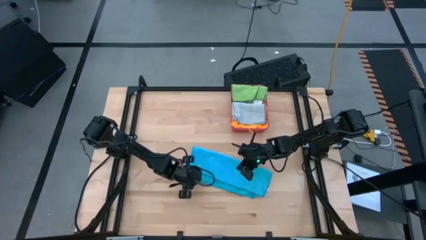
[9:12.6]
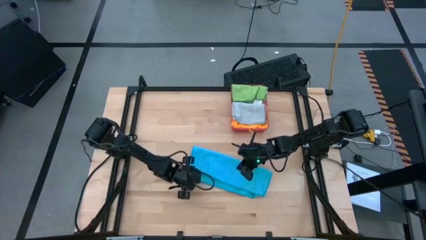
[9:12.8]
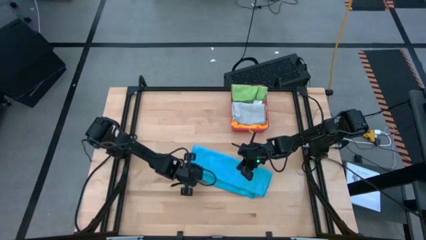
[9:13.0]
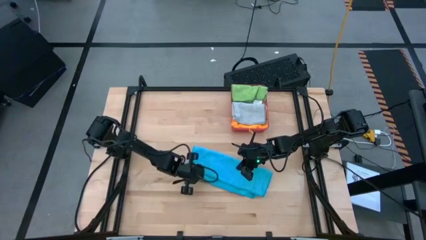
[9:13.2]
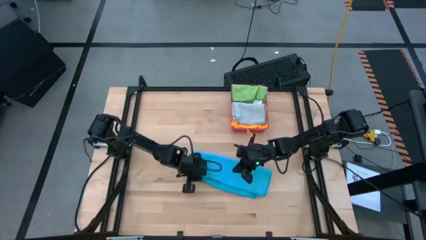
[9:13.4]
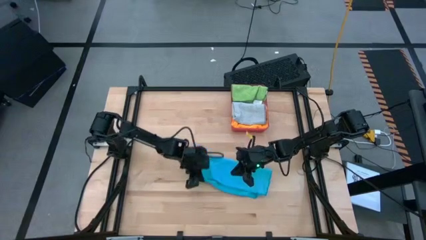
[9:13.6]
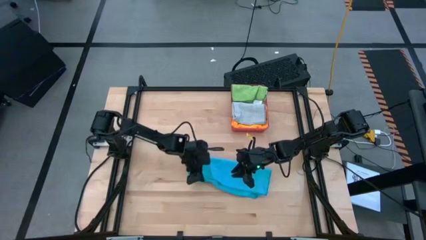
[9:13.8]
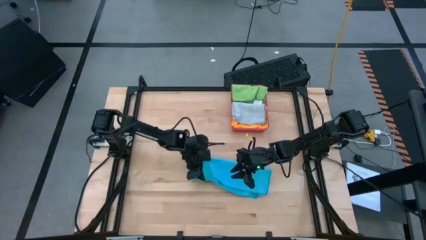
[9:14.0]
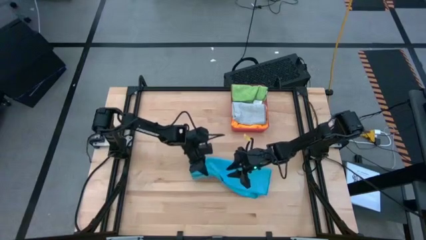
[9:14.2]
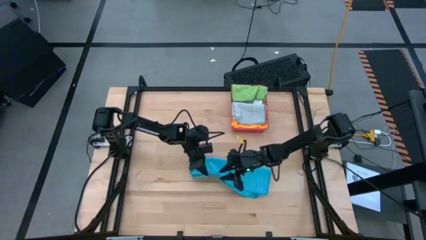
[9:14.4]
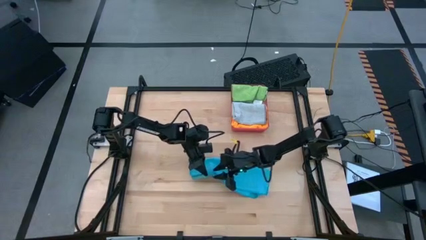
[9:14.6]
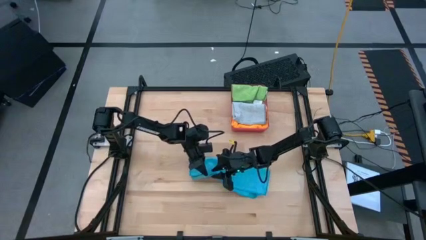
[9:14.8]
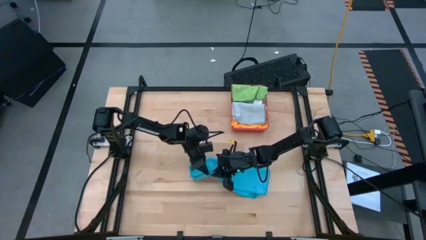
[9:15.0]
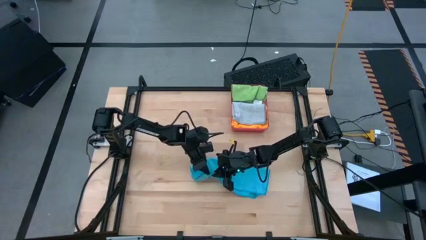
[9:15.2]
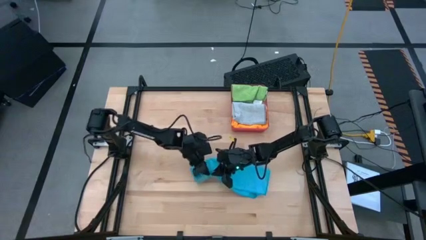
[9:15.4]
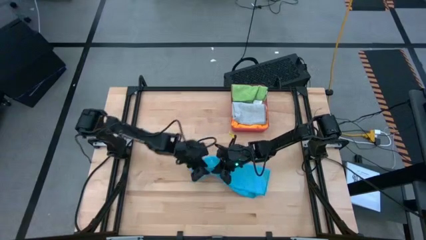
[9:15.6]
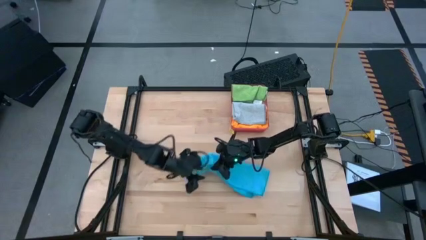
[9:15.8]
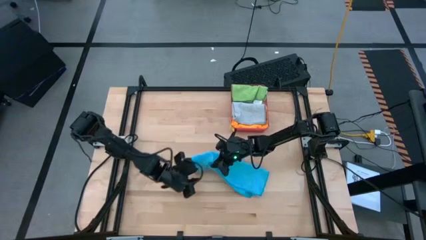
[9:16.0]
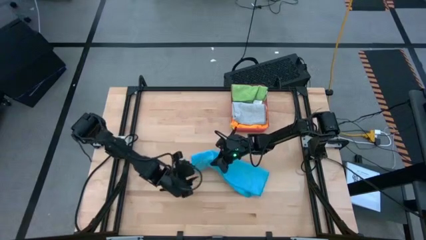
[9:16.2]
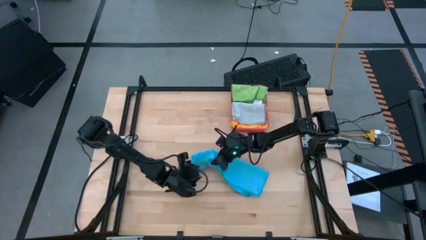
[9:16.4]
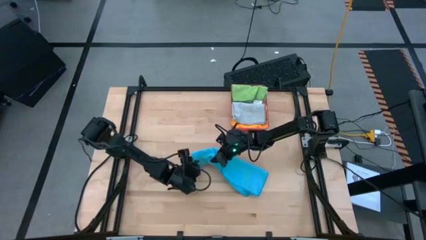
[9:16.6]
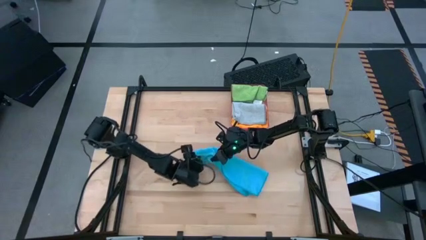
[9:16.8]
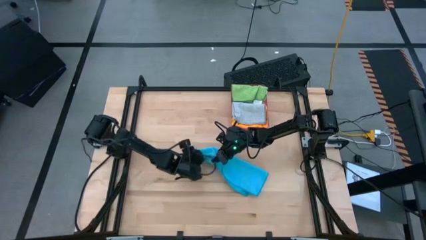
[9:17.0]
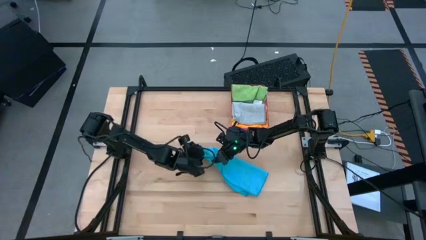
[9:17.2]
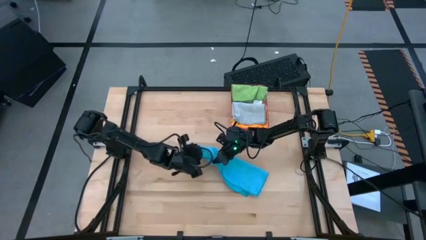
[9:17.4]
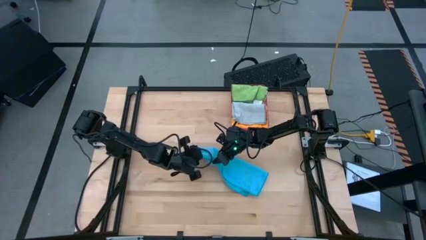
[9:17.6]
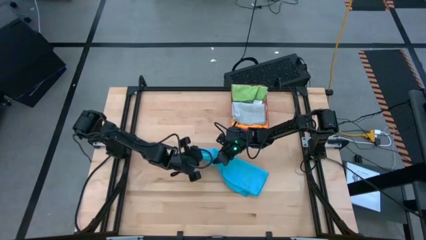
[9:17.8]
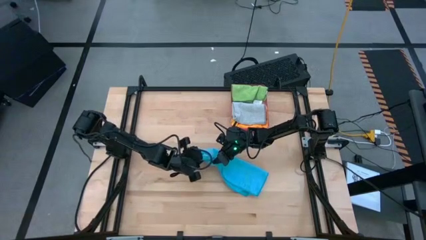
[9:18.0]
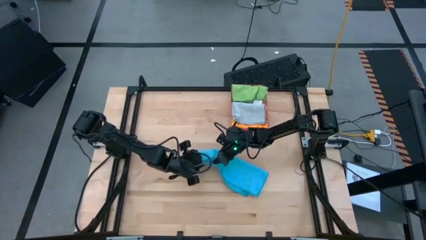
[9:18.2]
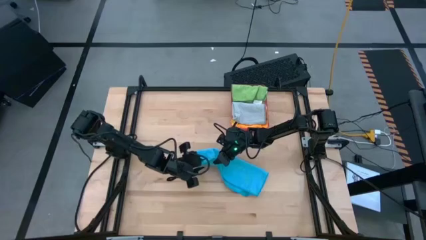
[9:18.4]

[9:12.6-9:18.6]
Task: Fold microfiber towels
Fold the blue microfiber cloth

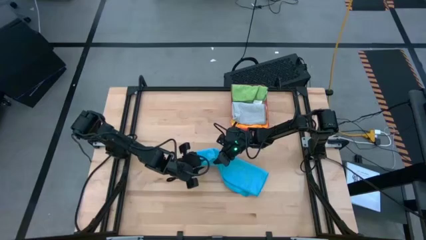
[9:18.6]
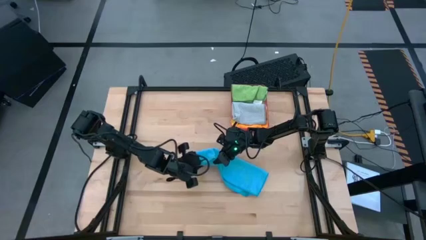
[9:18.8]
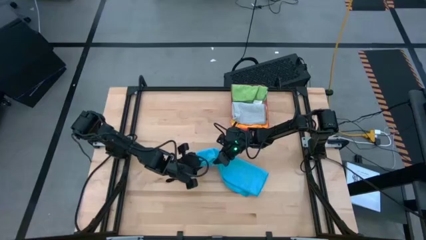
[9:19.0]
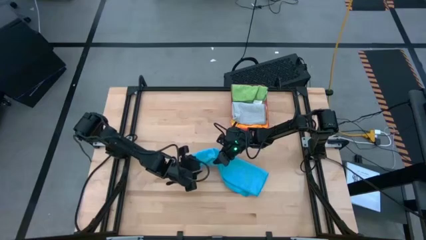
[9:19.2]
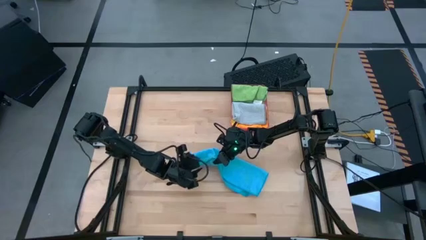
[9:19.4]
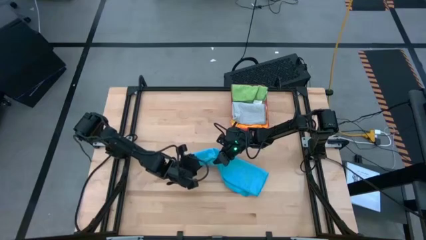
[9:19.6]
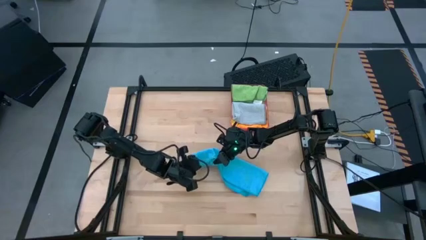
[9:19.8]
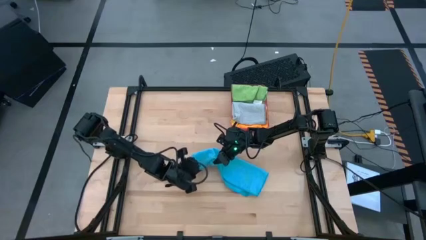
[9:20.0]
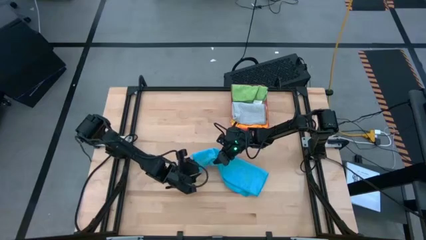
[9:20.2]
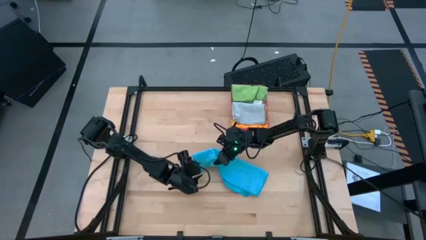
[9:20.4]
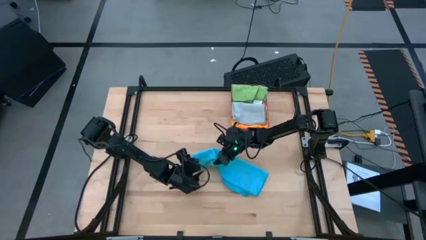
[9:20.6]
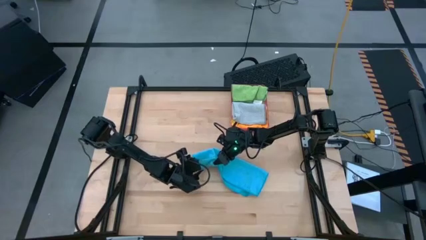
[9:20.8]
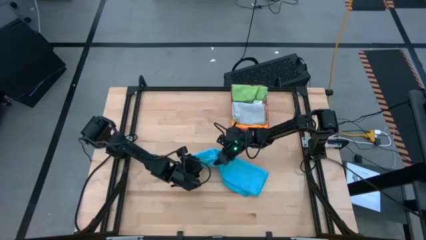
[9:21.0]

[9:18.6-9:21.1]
Fold the blue microfiber cloth

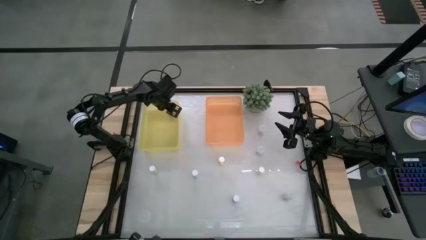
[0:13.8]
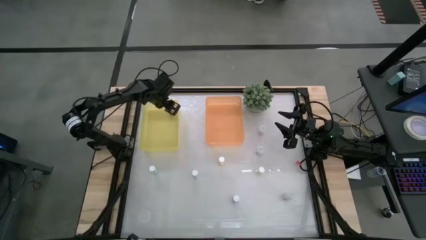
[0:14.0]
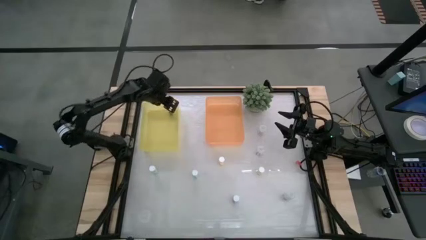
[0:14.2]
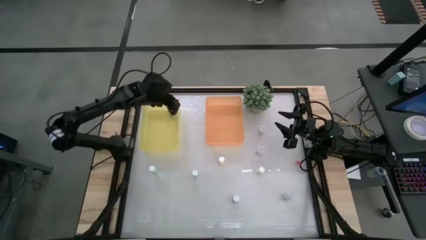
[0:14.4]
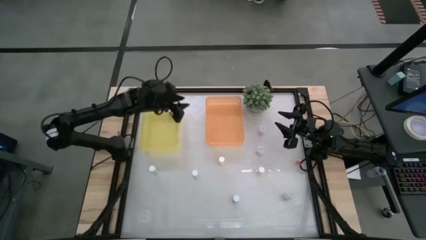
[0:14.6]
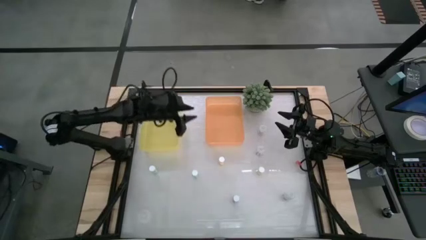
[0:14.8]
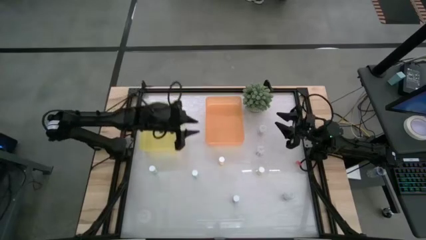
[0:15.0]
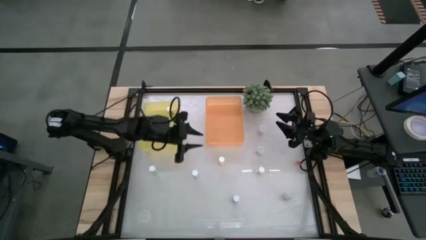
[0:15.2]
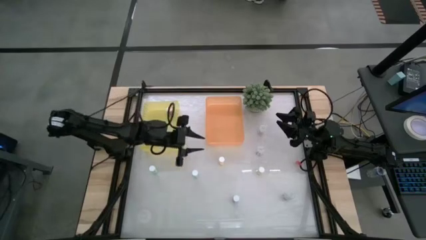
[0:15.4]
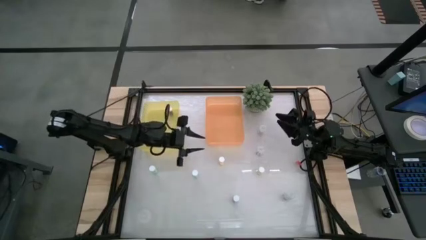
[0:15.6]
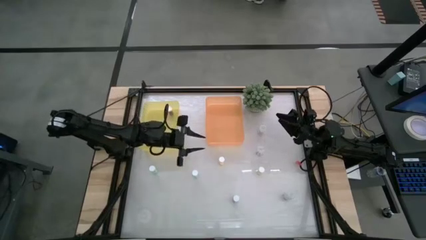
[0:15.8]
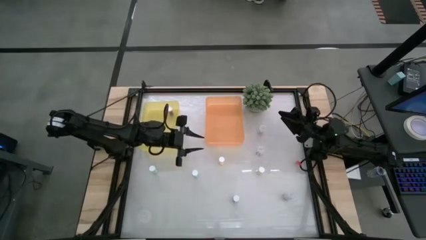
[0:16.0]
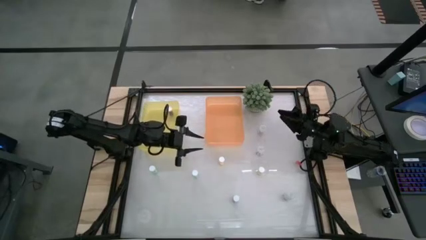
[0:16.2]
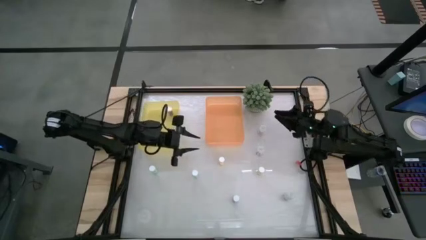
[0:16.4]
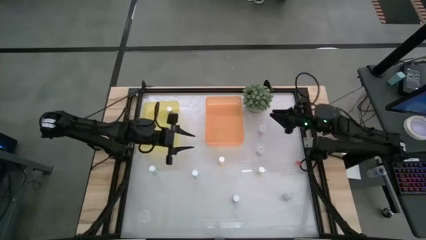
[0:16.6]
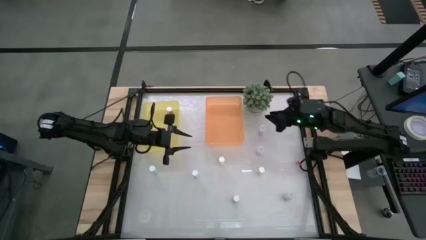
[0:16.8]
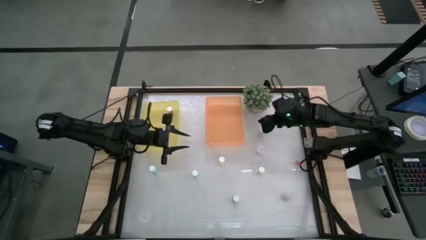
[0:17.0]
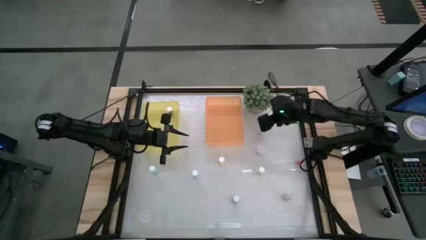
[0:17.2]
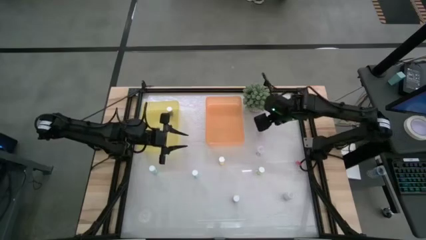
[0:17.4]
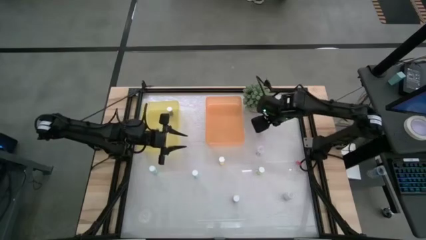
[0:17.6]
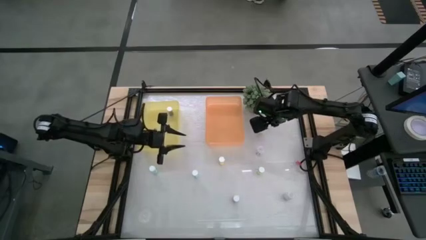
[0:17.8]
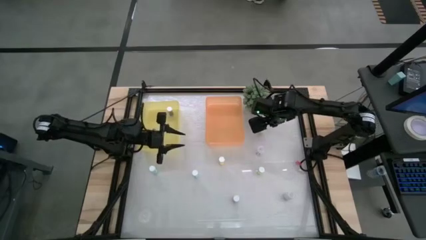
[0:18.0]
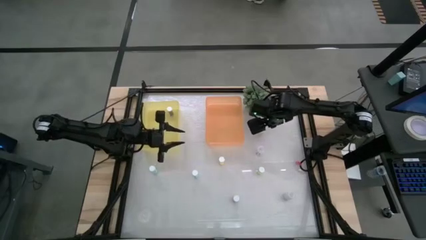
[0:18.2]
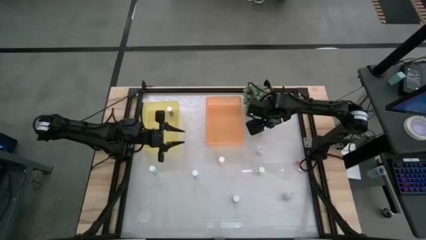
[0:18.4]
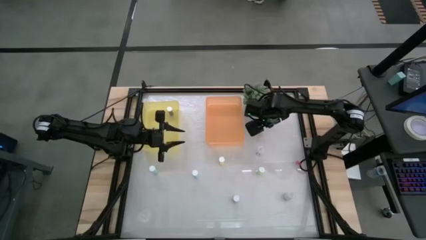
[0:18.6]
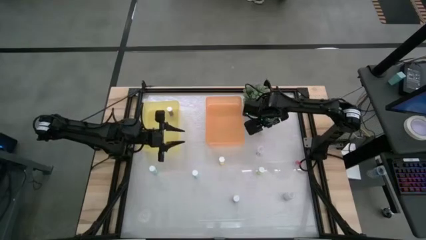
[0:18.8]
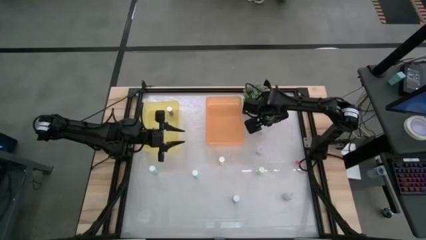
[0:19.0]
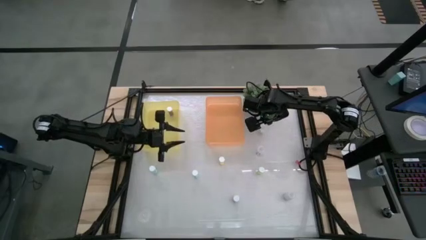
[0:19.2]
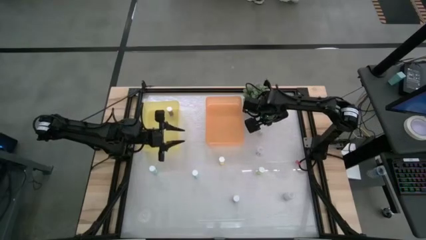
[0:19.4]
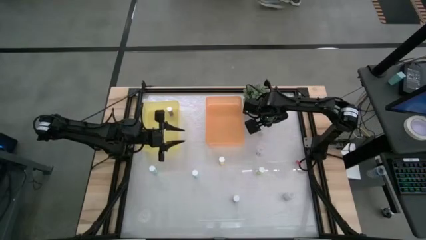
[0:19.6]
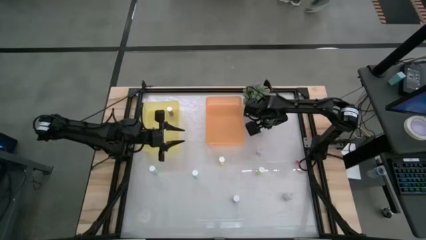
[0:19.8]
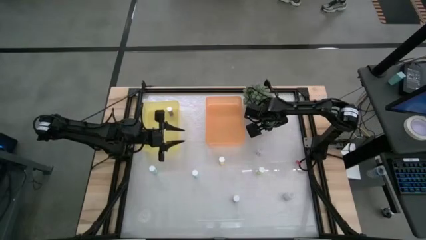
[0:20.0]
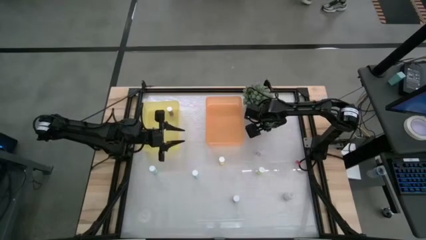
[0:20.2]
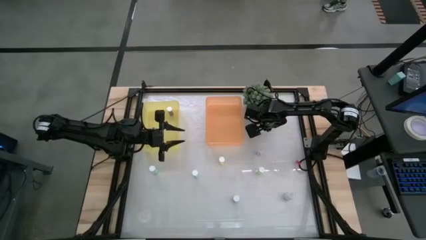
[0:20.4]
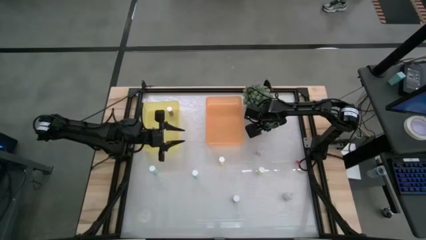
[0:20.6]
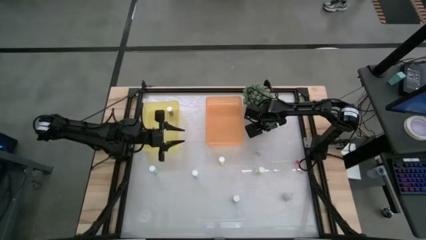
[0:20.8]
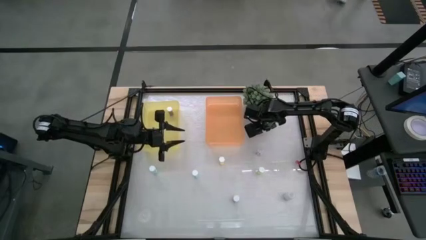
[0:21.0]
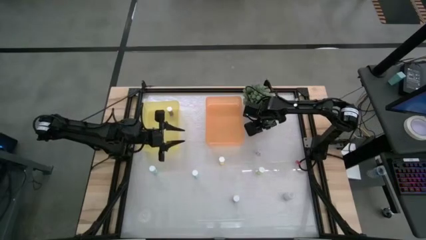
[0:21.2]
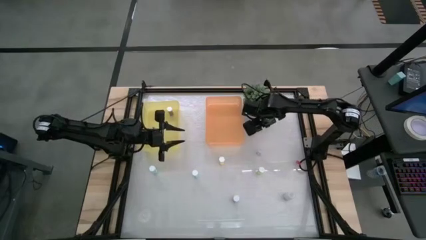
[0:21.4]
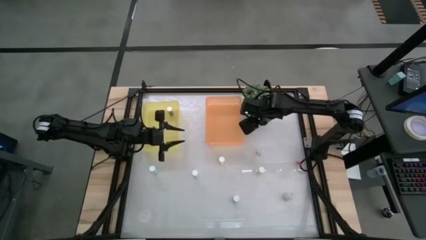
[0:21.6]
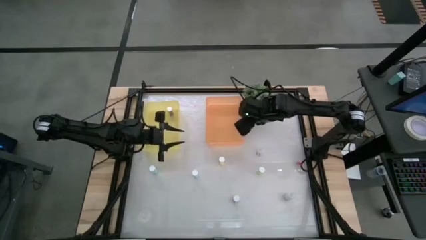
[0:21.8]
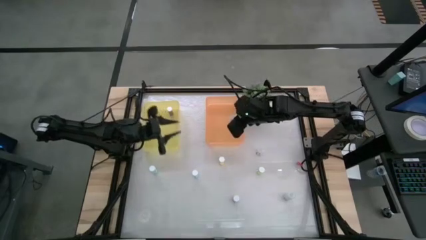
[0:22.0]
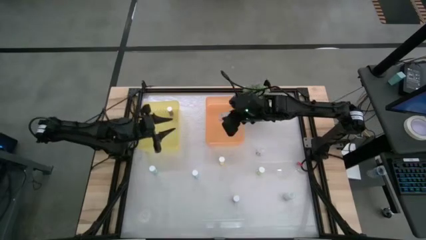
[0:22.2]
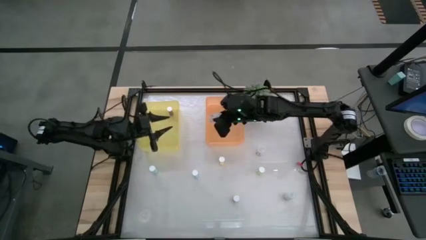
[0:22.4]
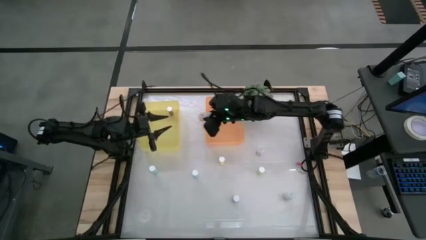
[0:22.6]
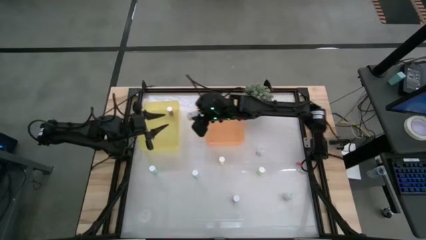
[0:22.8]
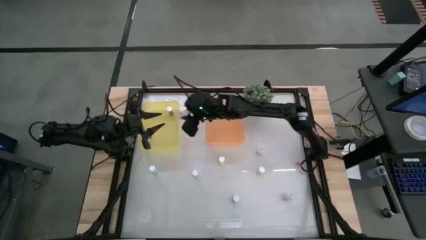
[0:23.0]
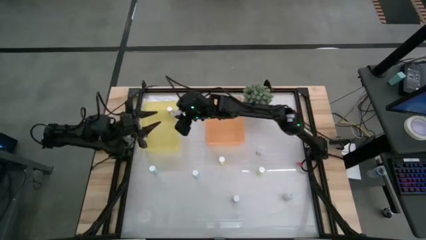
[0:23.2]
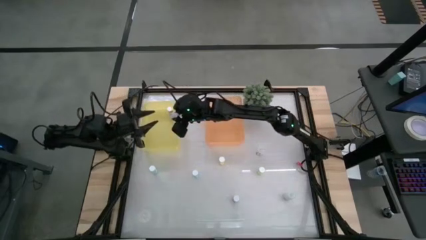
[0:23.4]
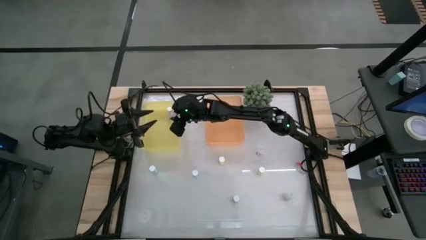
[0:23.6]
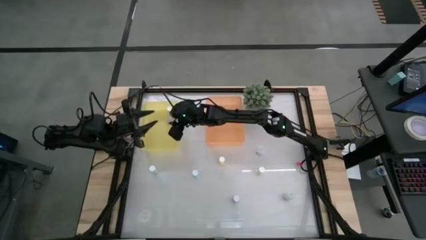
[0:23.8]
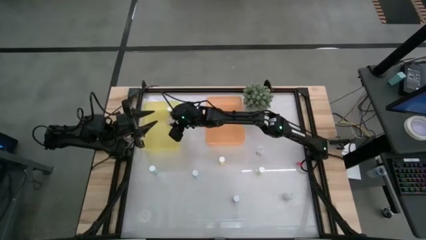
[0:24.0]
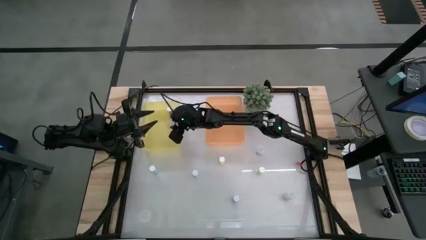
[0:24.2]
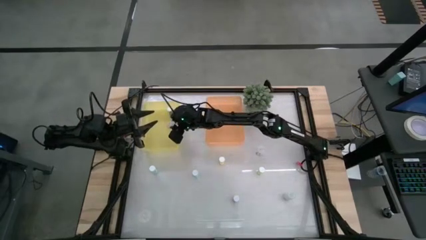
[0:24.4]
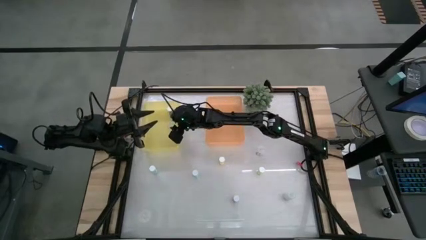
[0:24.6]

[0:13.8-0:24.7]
Task: Pick and place medicine bottles into bin by pill shape (circle, oval)
Put the top transparent capsule bottle into the yellow bin
